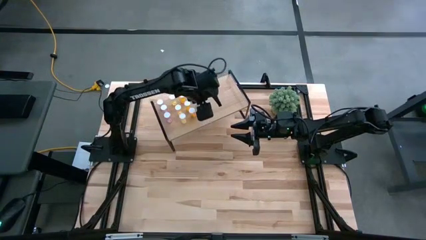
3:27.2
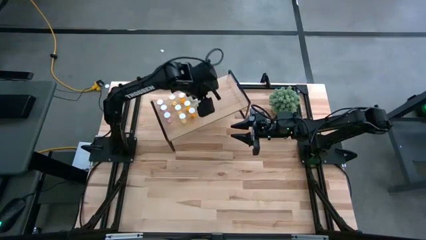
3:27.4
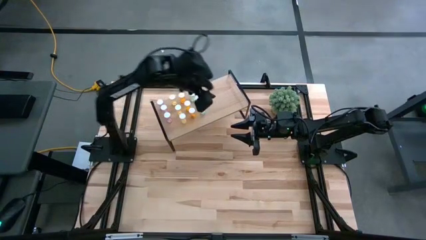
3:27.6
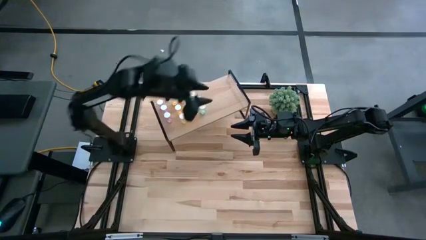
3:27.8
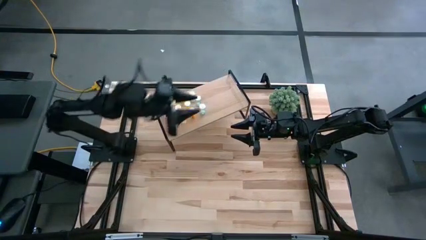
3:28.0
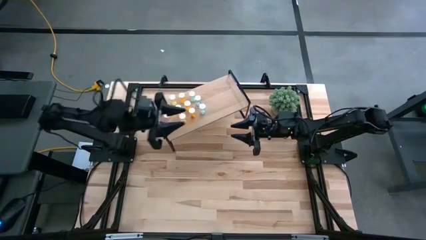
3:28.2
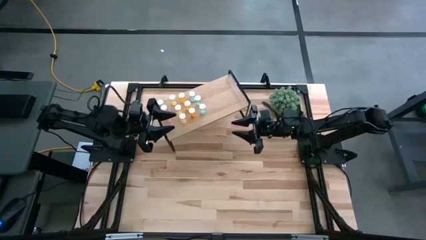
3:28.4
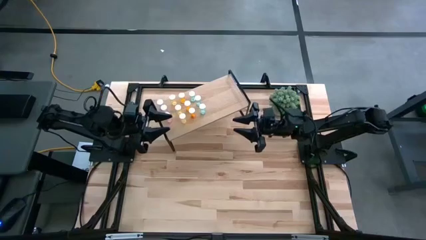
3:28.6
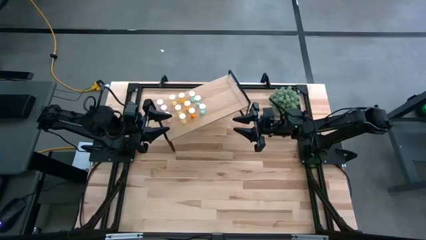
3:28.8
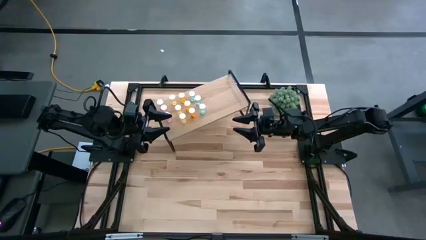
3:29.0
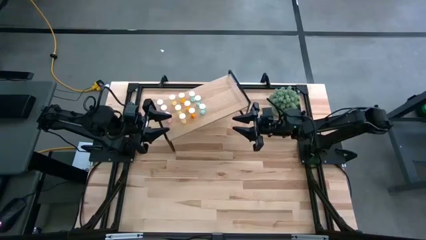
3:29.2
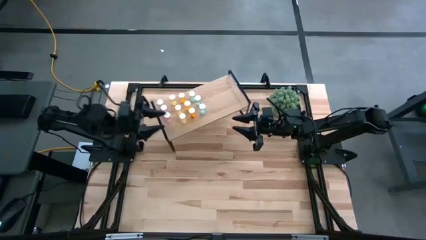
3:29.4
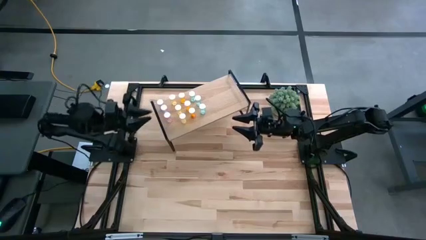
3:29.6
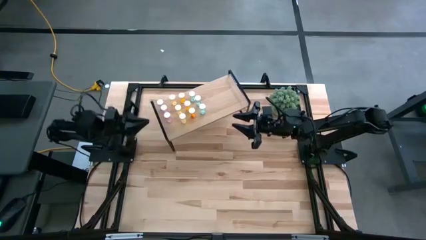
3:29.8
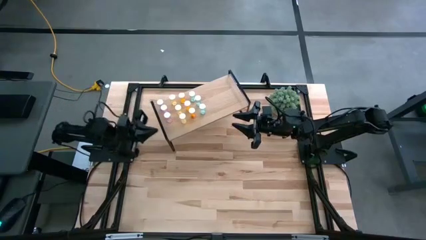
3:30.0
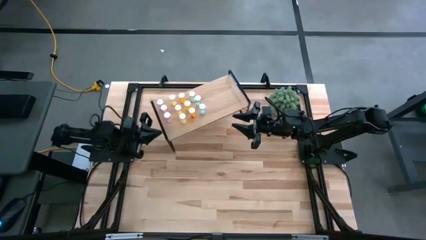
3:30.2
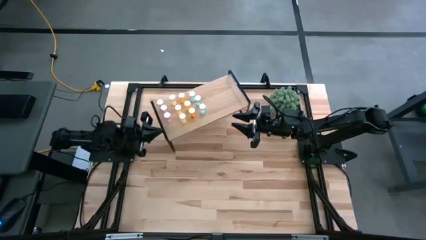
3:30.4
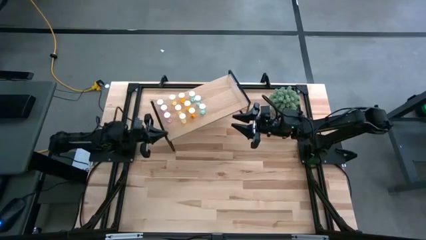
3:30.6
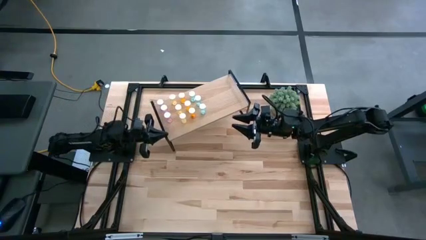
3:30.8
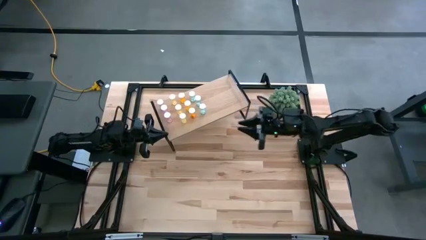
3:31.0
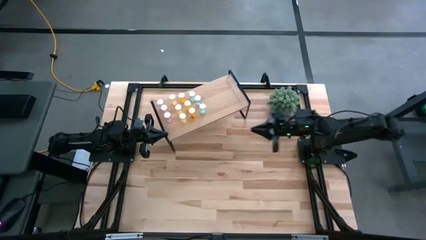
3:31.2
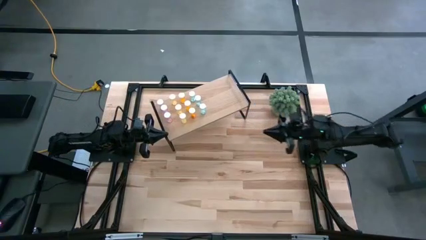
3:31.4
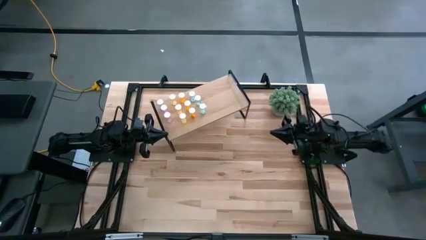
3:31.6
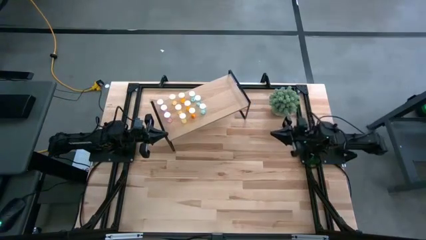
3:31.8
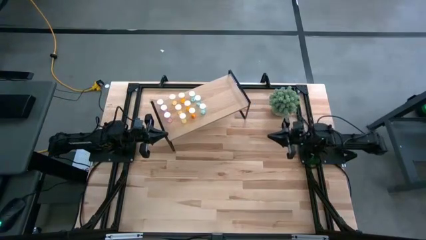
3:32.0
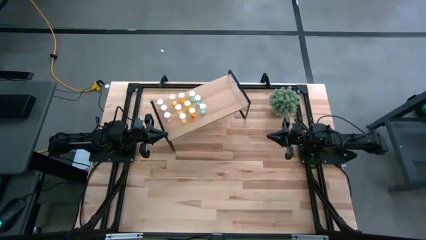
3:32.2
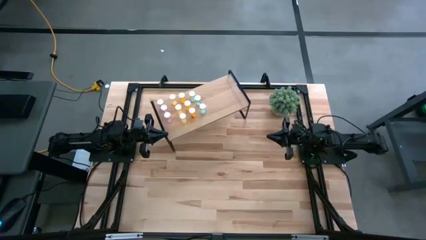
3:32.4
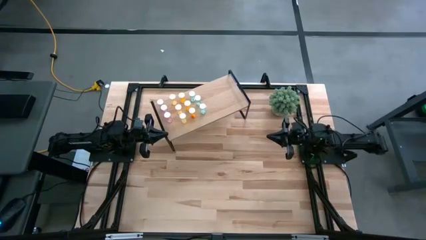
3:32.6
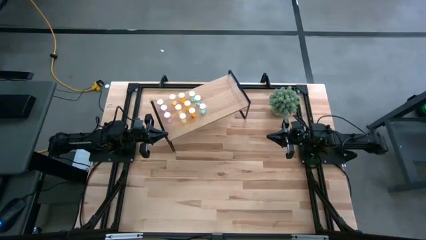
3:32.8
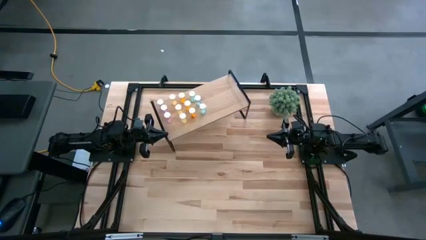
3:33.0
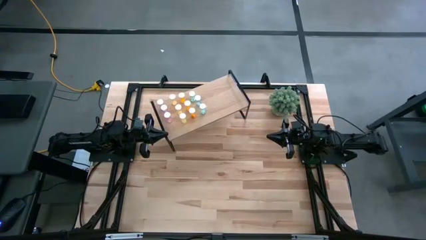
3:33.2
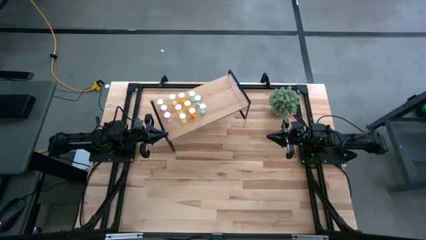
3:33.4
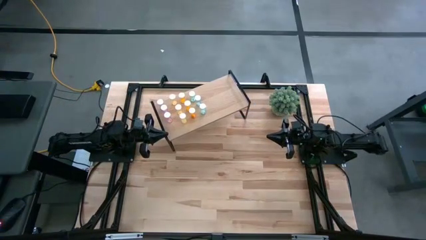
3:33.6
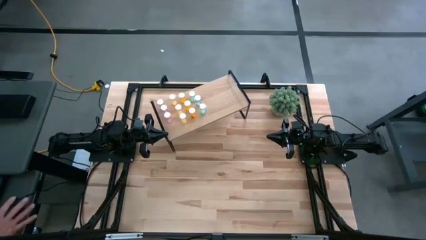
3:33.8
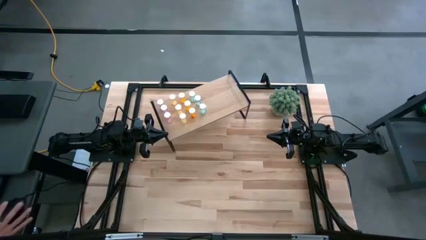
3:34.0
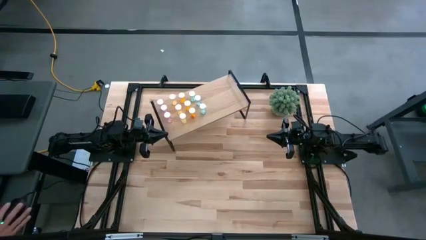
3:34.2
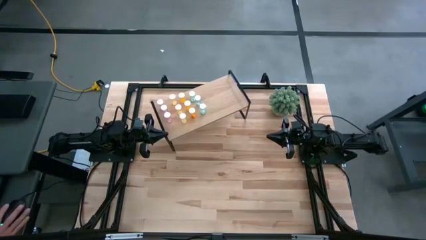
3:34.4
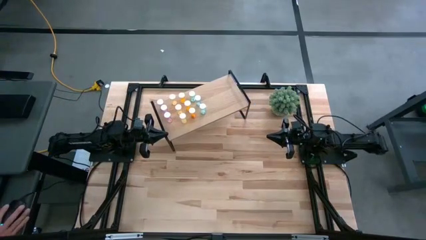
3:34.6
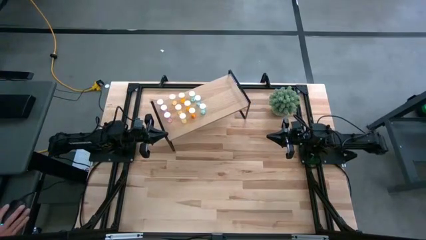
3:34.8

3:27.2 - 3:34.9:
Task: Pick and place medicine bottles onto shelf by color
Return to Home Position

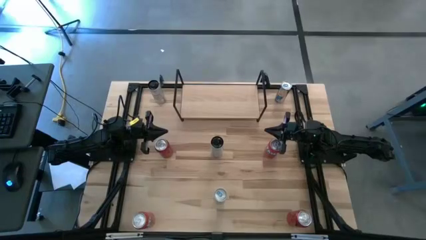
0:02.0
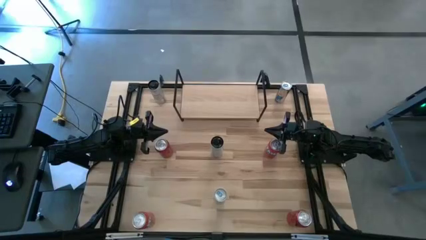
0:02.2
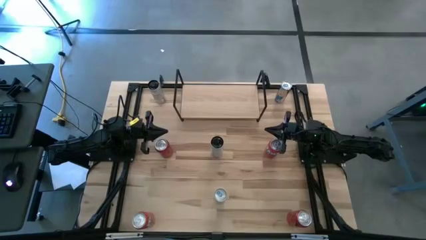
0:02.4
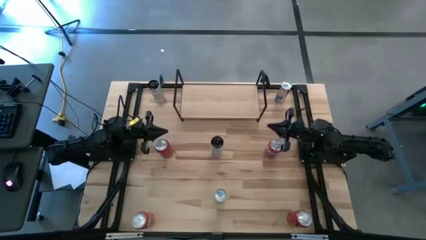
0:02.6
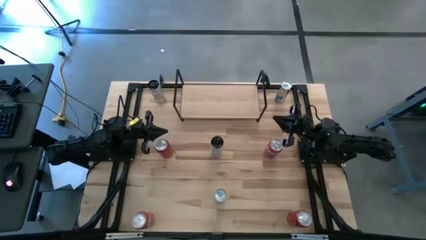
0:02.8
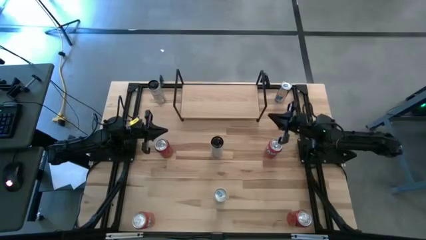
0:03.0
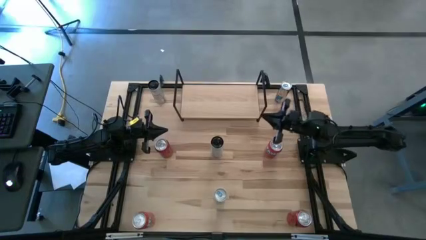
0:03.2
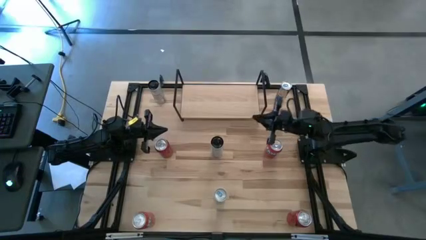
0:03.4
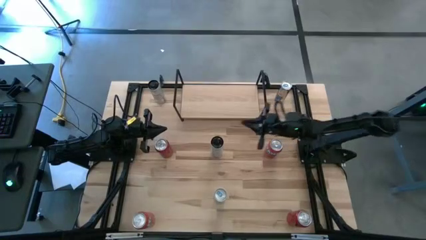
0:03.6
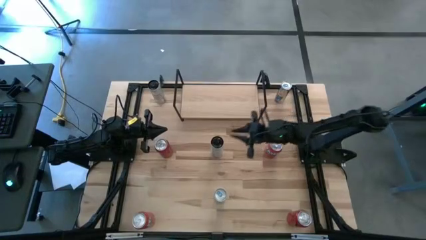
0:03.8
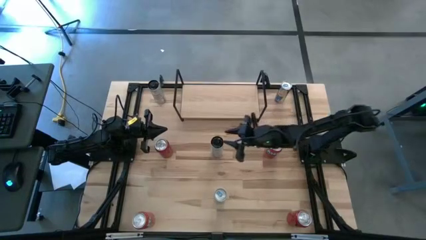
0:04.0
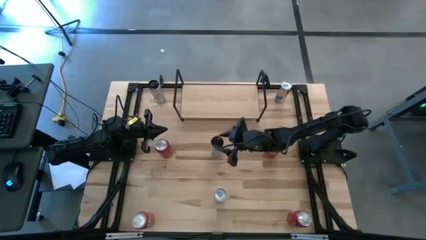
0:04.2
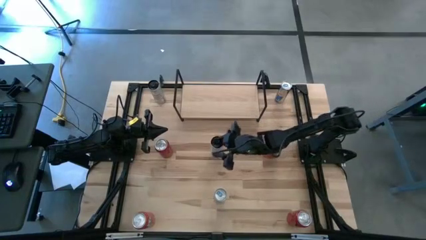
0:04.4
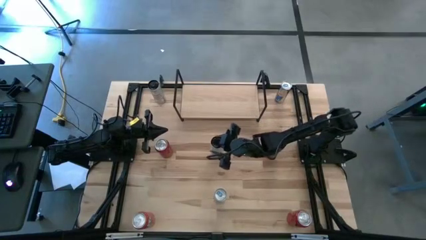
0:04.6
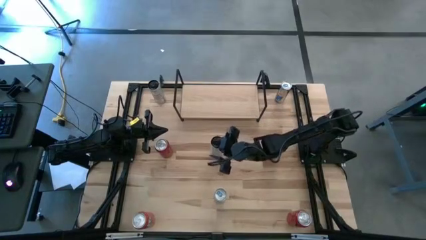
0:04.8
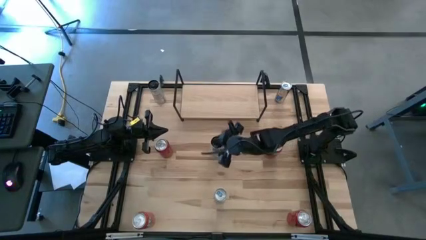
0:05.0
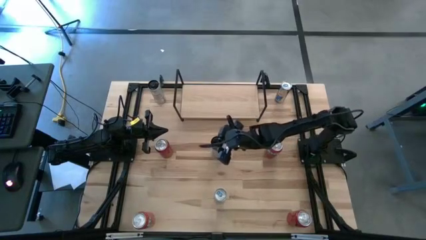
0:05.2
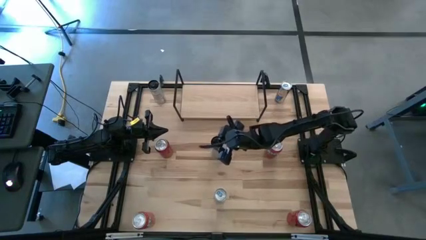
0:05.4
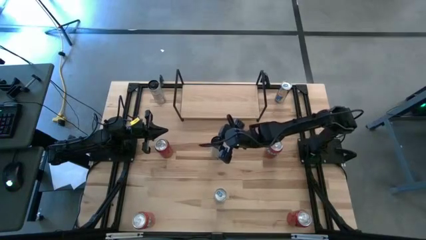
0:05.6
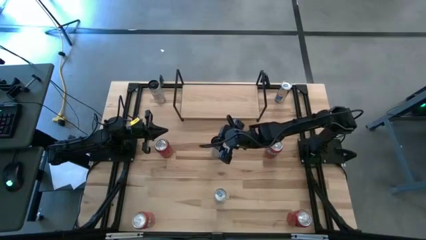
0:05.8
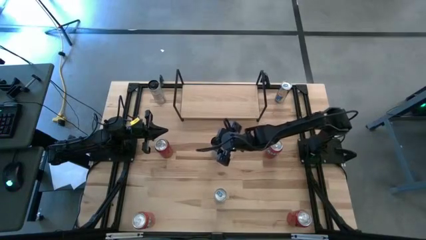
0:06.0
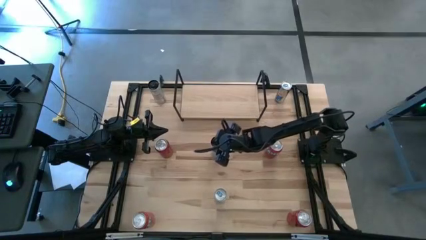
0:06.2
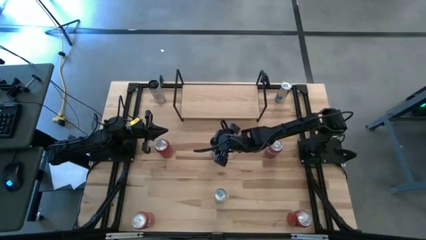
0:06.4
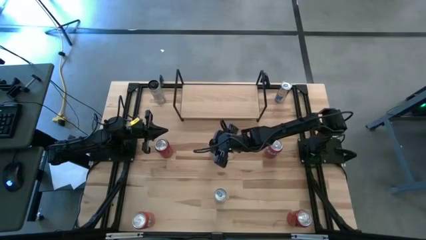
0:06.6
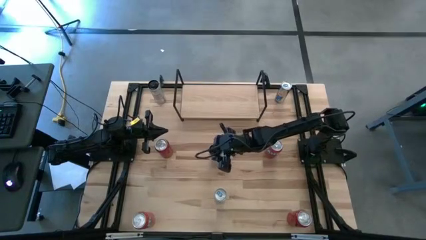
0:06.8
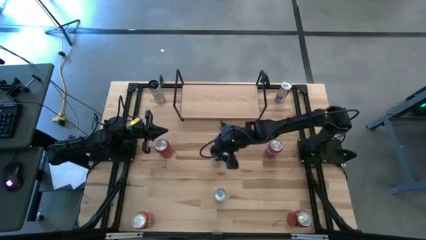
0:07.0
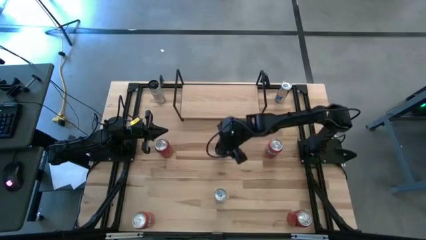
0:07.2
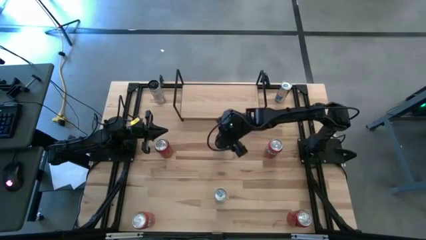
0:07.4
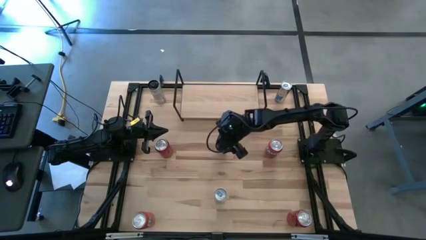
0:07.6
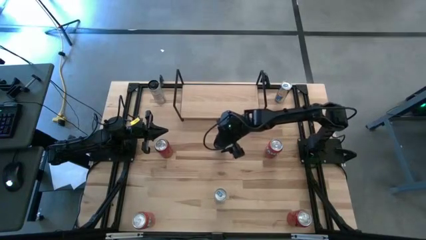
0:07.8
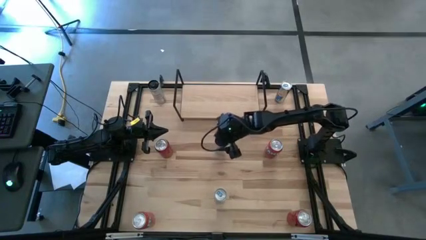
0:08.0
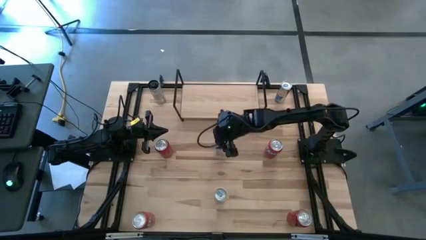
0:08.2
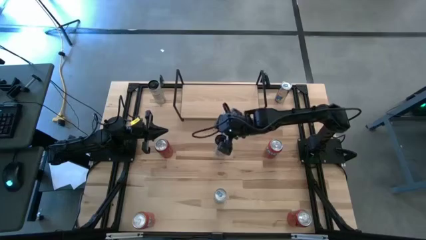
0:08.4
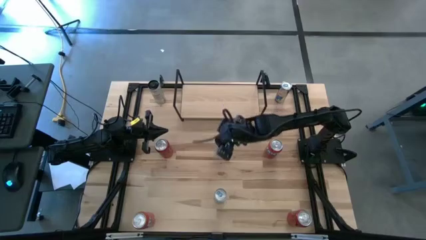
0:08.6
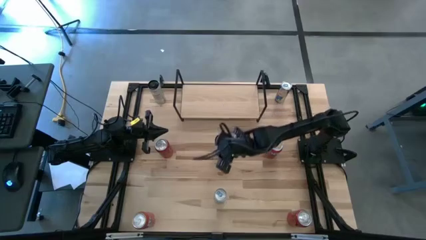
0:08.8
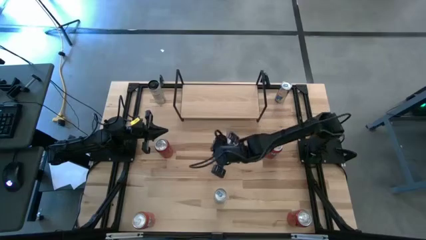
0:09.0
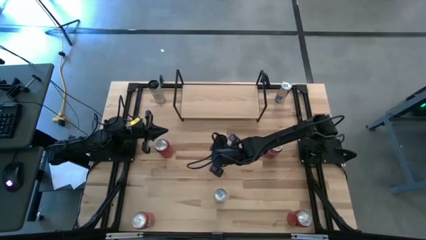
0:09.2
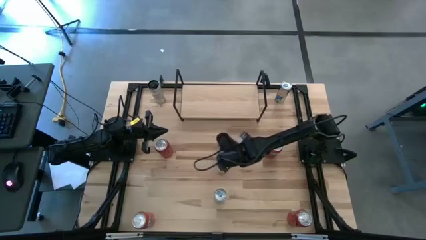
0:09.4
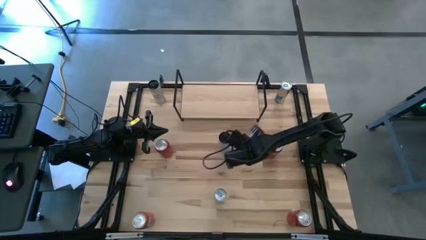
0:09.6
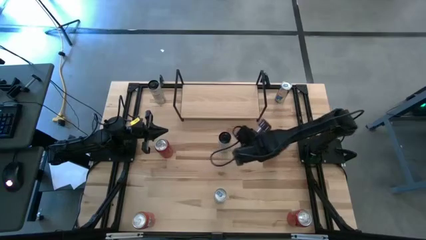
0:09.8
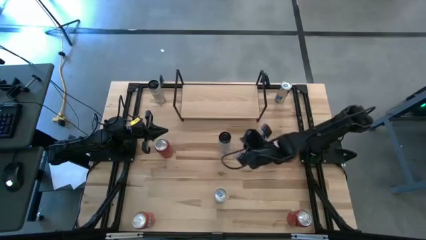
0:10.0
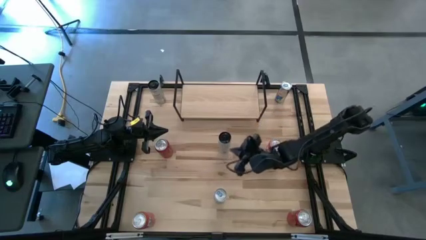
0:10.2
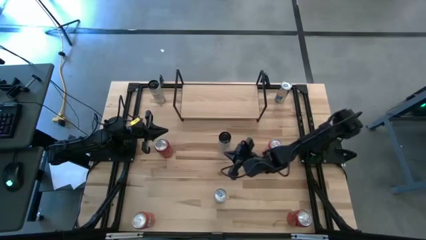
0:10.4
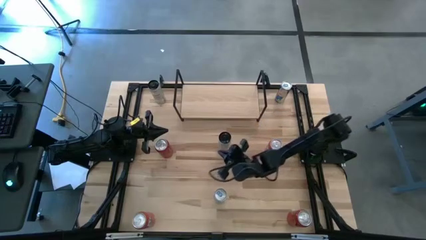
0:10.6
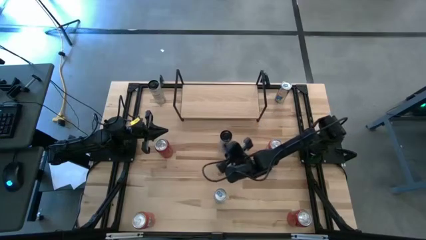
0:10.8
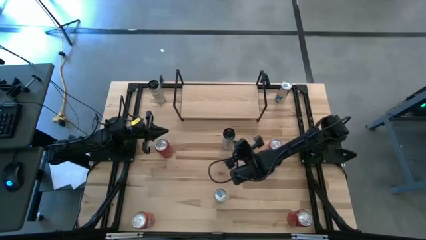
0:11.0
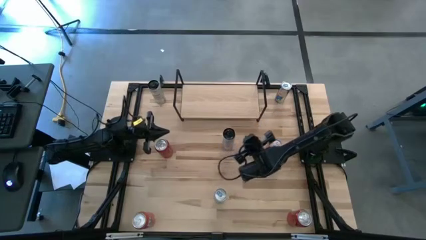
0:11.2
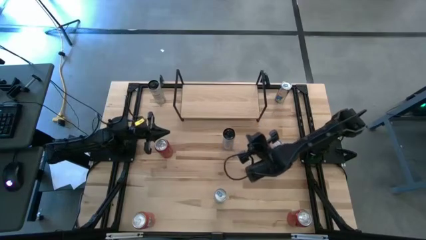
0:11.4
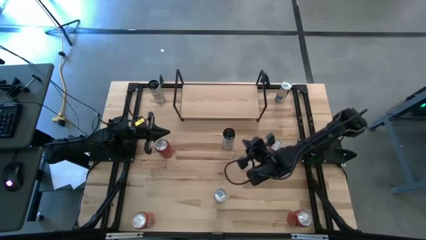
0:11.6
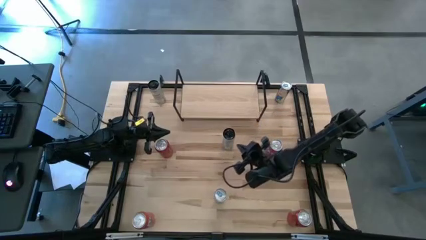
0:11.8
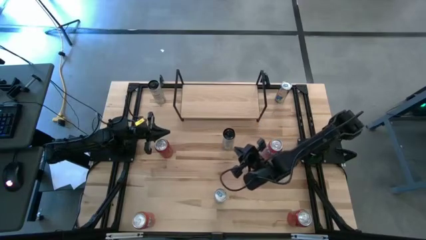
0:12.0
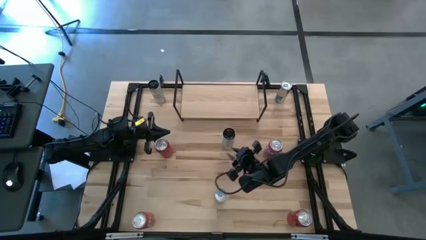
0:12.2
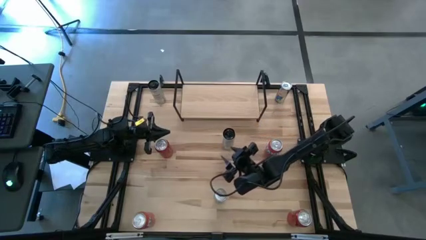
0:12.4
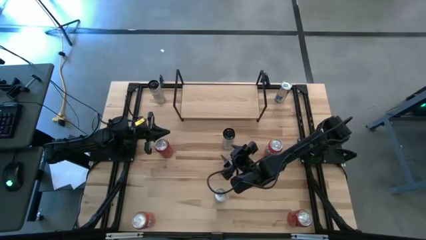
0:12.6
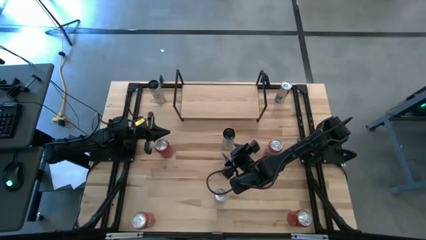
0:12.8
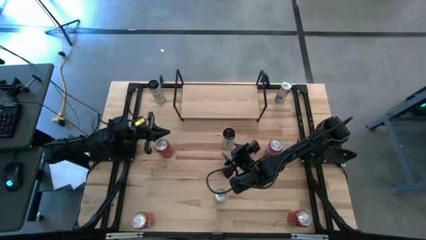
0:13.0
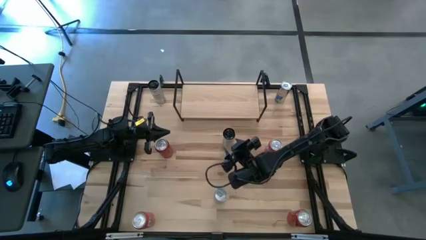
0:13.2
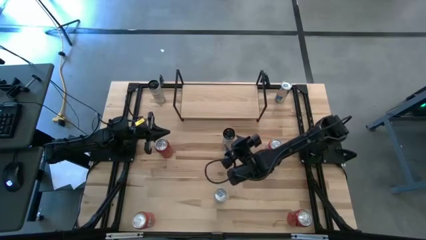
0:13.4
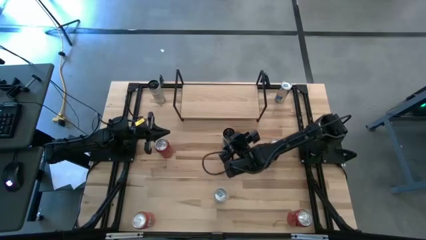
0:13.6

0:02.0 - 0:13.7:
Task: Place canned beverage on shelf
Put the bottom white yellow soda can on the shelf
